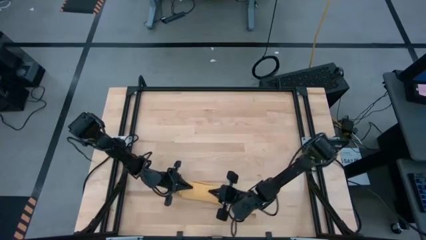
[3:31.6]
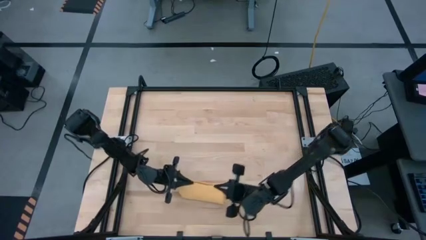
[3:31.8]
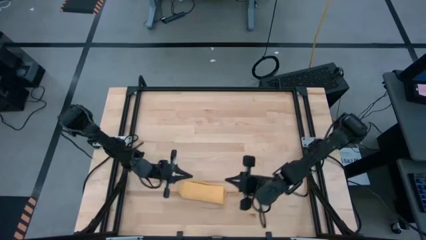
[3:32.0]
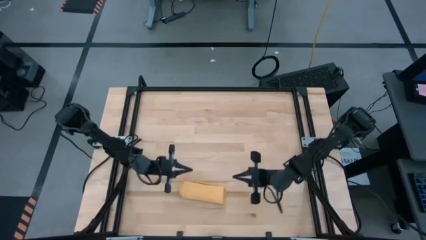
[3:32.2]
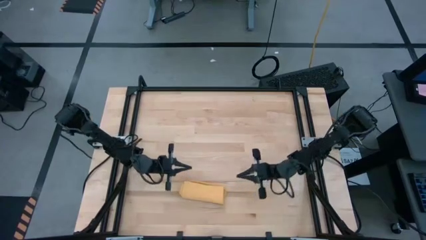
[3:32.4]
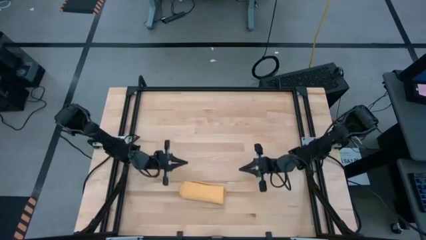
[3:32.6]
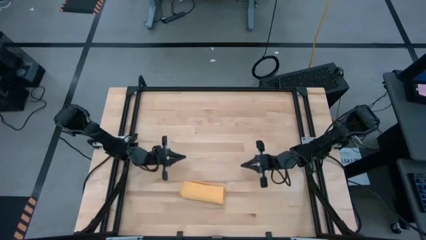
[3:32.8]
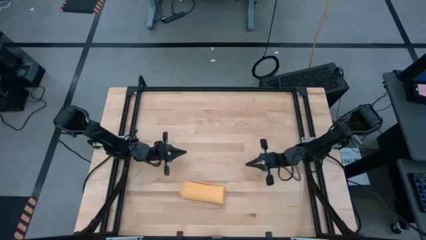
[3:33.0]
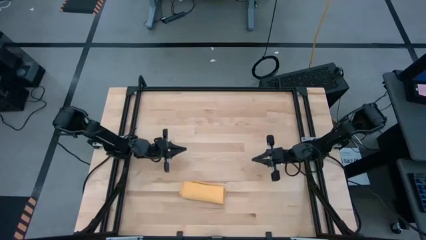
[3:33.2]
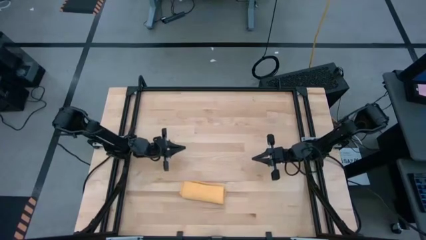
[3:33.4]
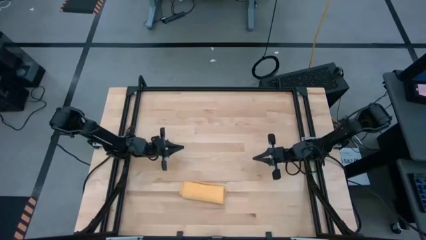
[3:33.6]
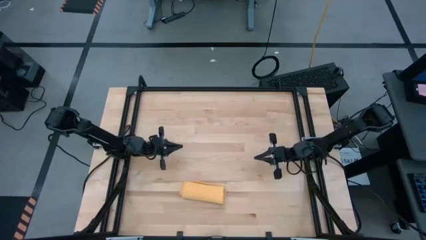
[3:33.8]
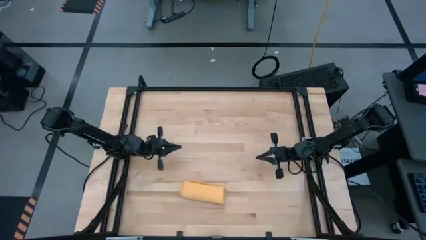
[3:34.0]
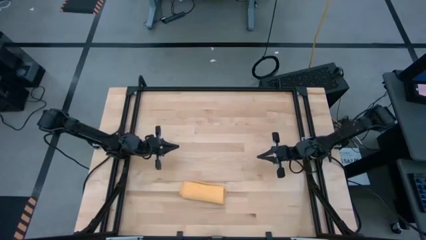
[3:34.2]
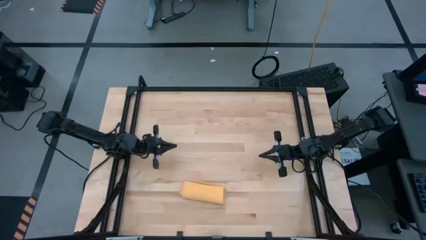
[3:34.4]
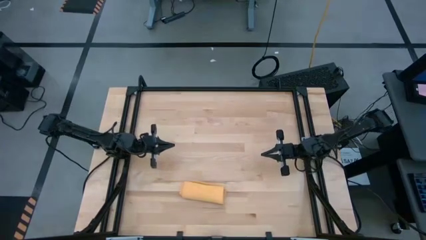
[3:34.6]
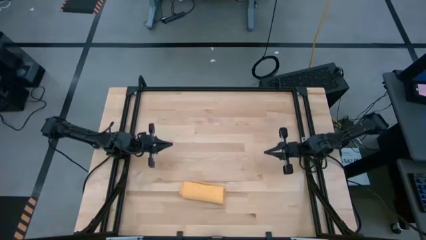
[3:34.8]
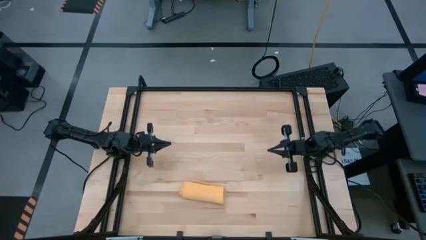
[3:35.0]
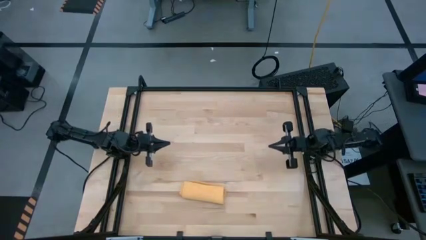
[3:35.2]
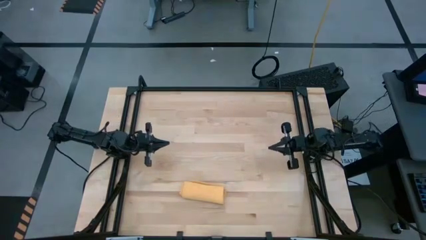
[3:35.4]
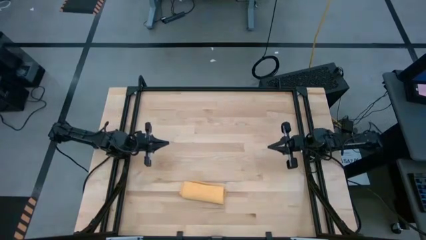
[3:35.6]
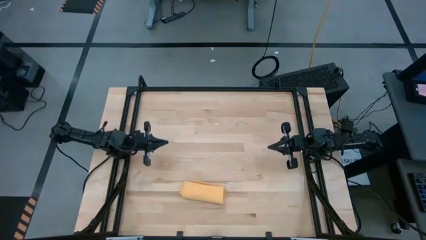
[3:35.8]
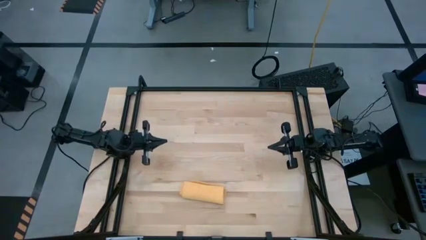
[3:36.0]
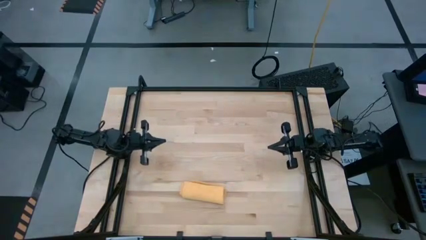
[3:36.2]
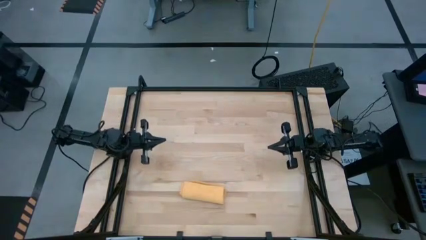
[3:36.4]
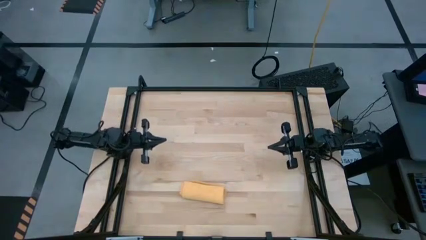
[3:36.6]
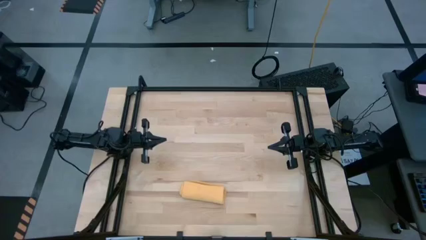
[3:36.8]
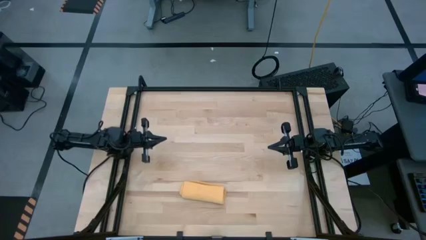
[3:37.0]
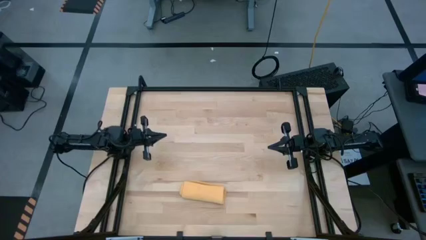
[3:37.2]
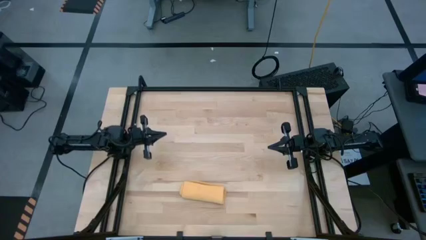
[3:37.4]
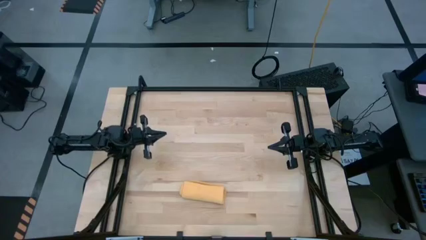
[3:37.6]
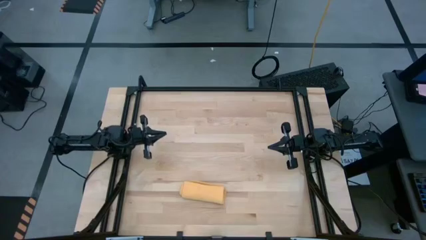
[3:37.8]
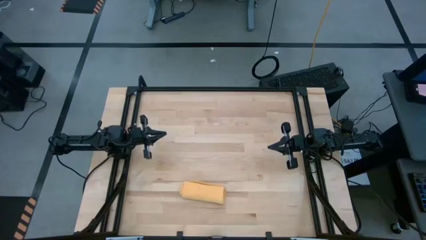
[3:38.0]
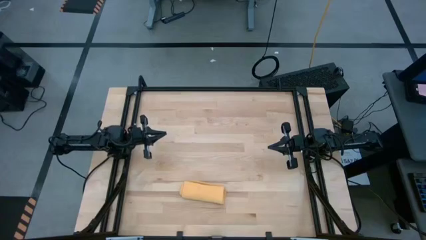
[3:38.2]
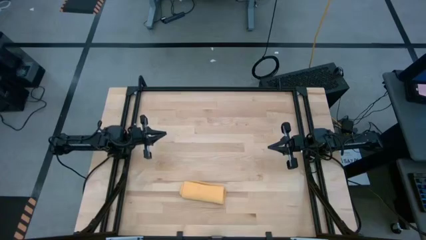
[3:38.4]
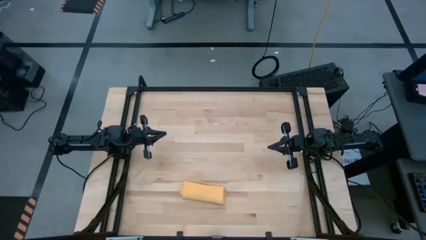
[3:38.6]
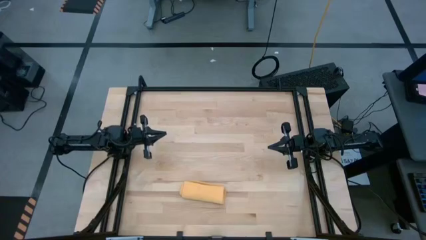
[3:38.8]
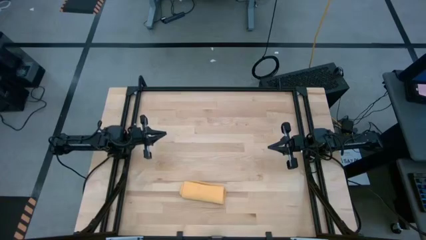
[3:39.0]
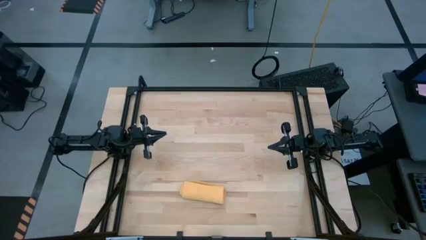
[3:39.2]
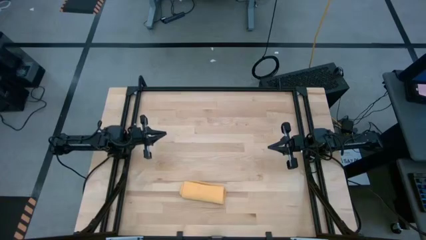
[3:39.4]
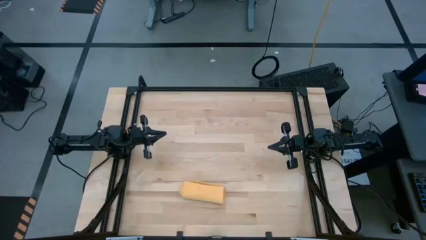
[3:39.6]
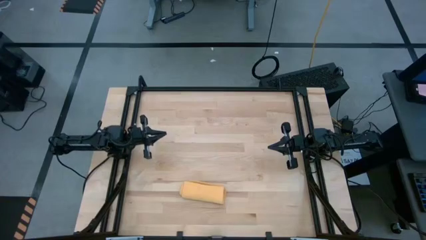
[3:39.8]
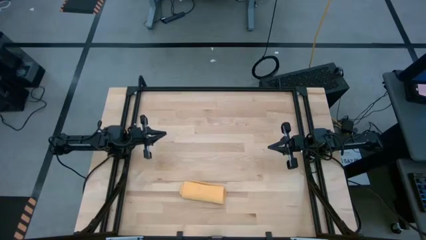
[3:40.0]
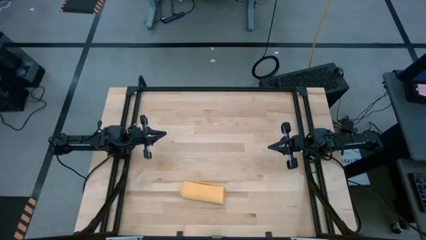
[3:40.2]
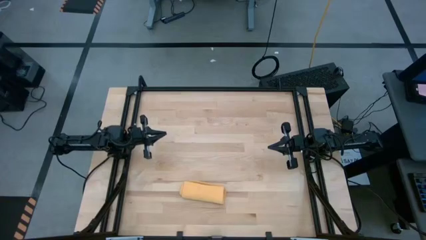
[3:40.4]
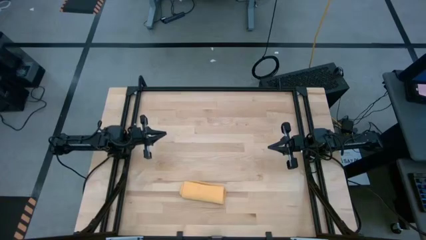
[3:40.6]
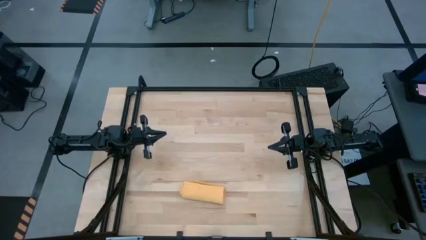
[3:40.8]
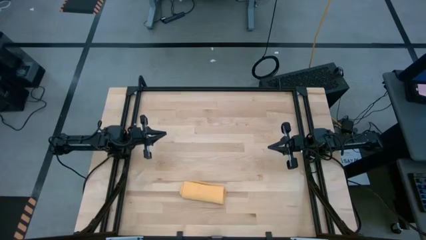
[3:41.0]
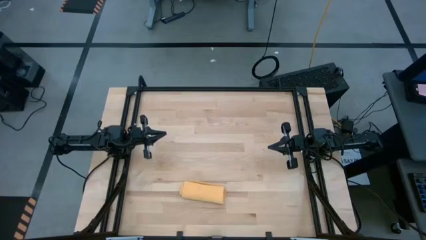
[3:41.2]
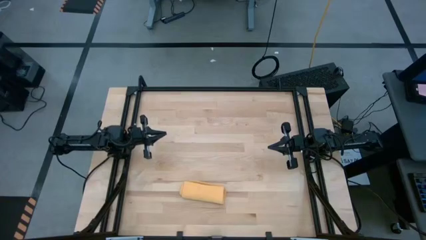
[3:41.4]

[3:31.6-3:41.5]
Task: Roll towel
Return to Home Position

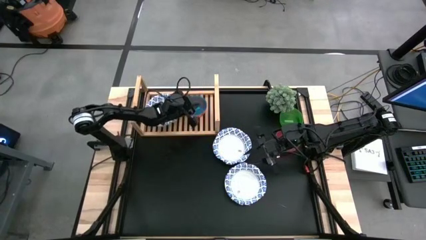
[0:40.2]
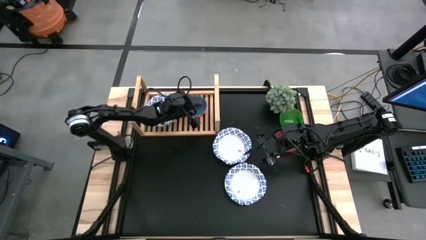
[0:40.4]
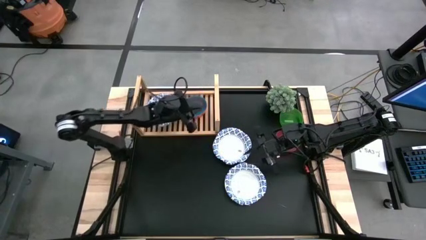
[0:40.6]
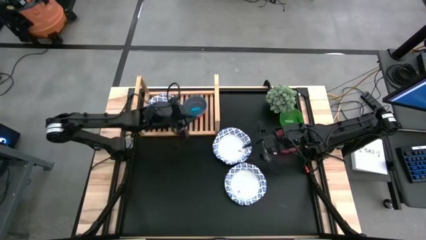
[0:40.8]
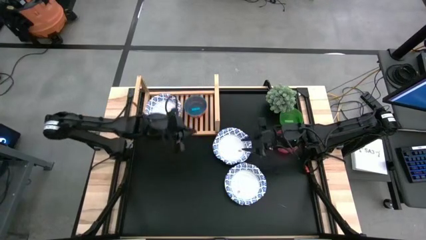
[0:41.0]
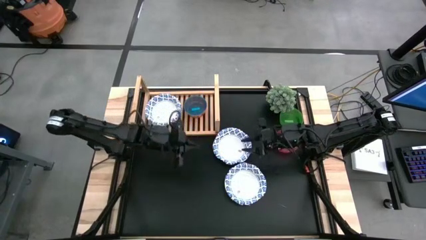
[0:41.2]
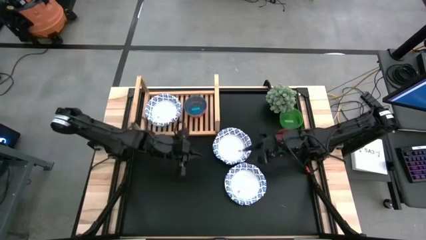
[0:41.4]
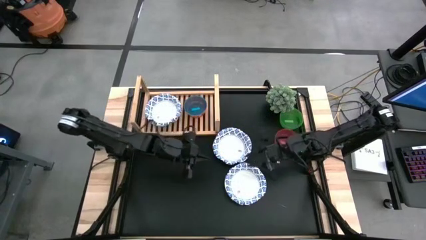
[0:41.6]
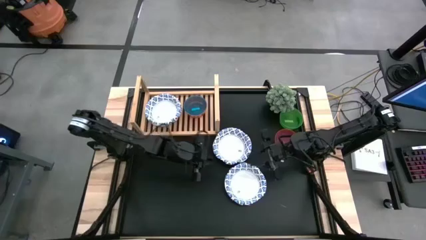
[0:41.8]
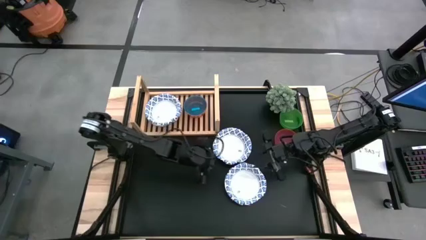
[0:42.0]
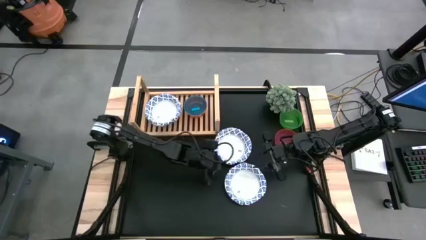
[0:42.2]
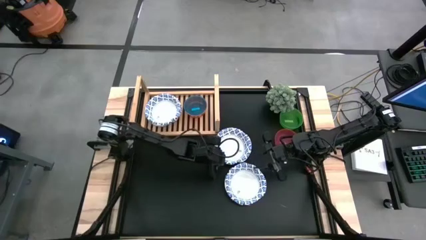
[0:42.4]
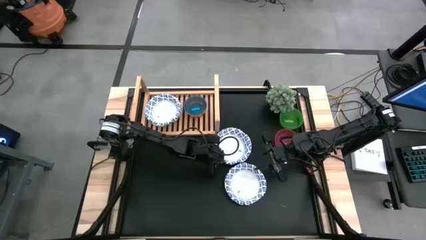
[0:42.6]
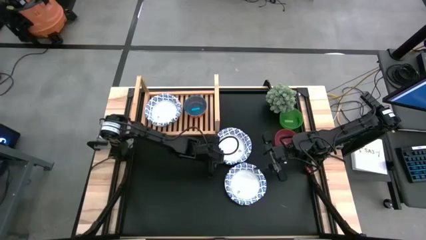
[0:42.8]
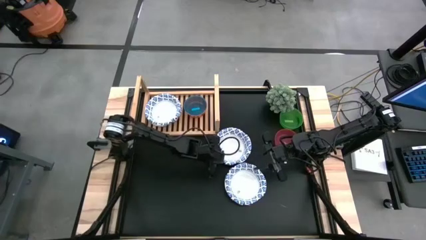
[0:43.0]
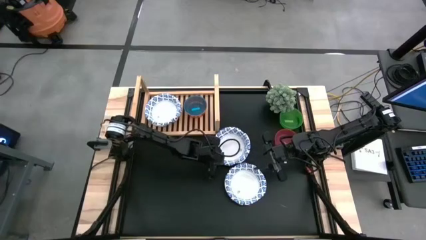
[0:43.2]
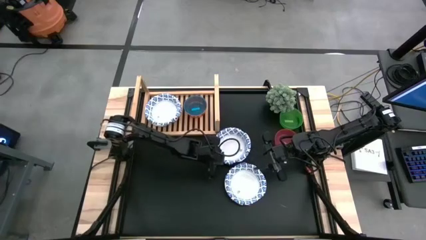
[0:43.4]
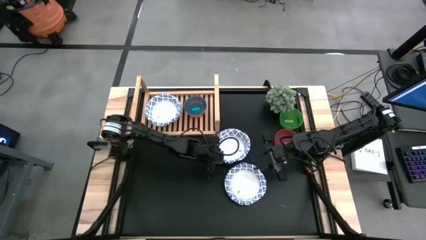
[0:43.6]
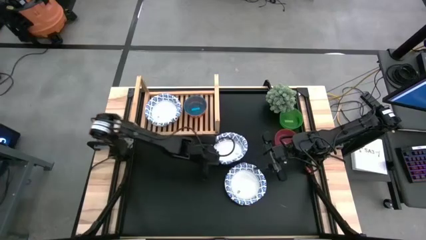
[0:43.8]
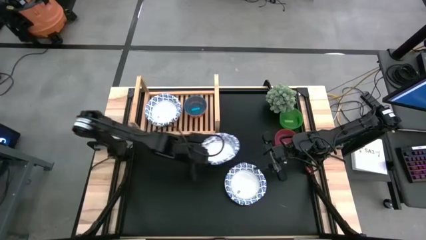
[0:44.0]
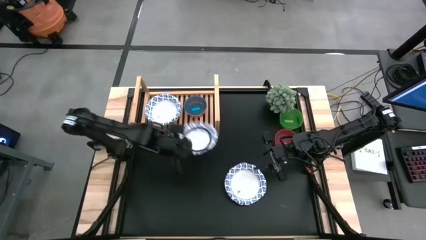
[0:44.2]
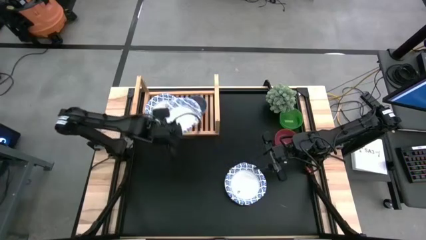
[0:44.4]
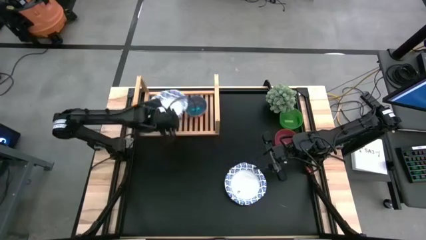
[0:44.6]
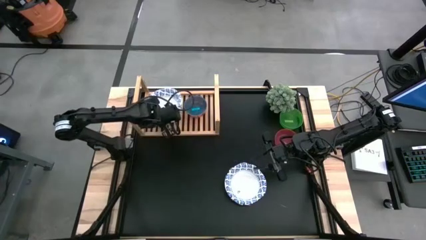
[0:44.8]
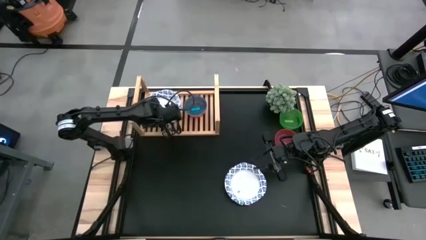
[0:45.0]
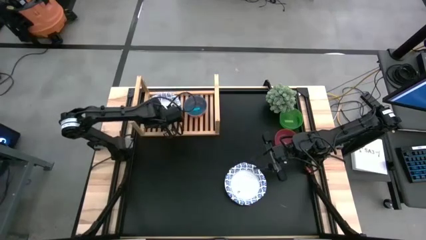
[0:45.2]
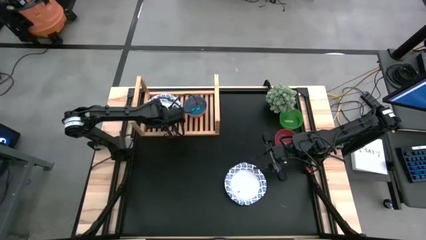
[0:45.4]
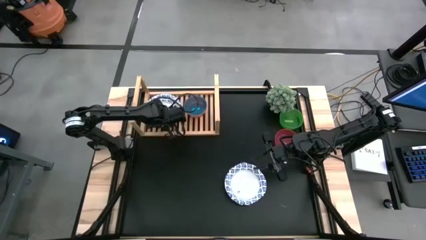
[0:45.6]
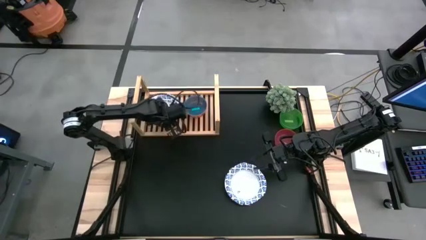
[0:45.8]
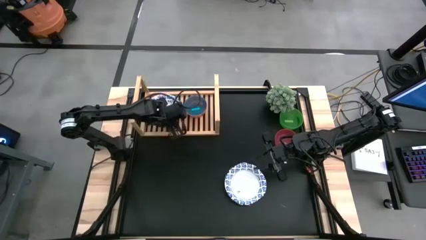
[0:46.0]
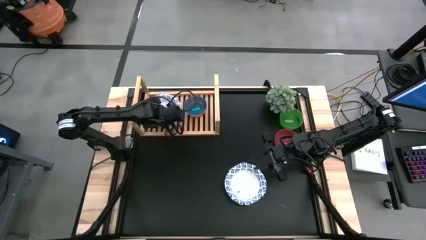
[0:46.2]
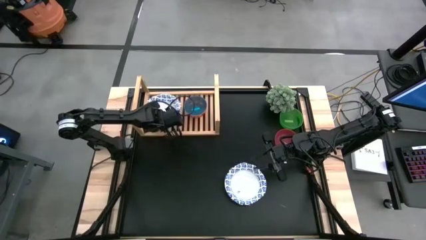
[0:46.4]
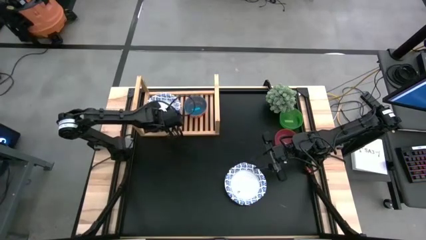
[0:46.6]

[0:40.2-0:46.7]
Task: Place and stack plates onto a shelf
Stack the top white and blue plate on top of the white and blue plate
